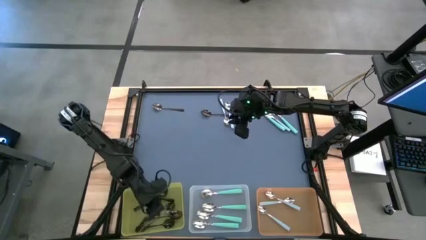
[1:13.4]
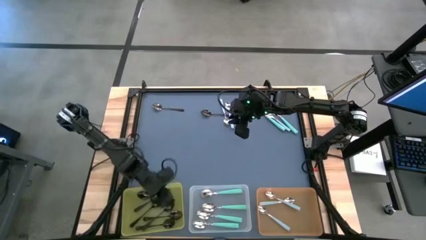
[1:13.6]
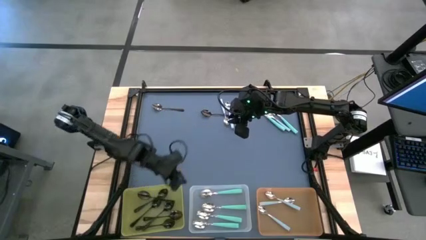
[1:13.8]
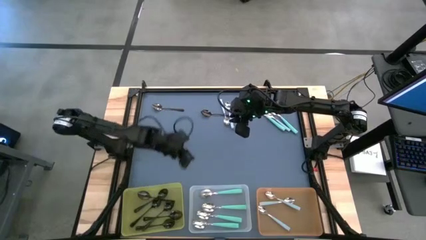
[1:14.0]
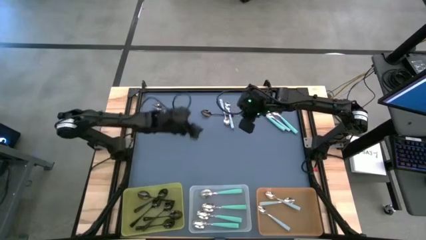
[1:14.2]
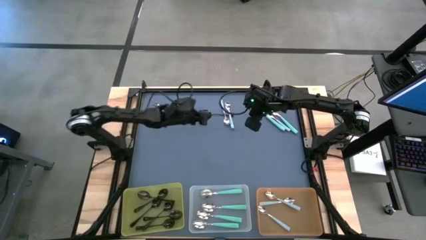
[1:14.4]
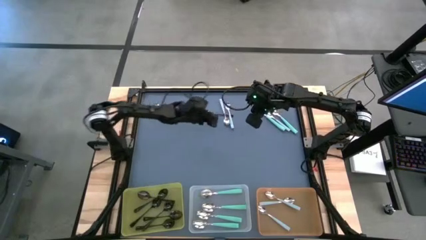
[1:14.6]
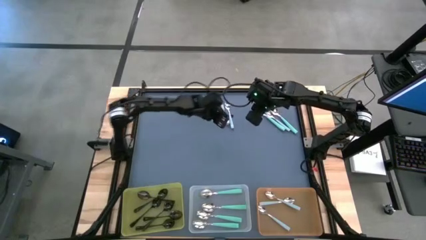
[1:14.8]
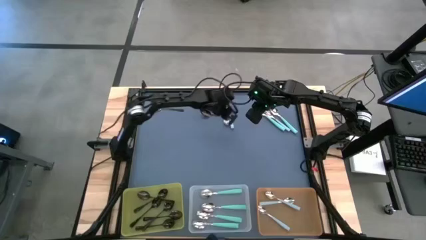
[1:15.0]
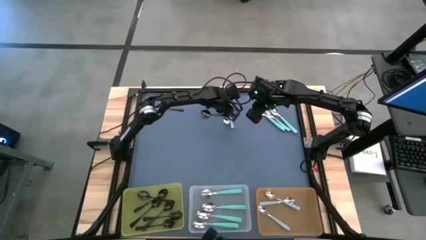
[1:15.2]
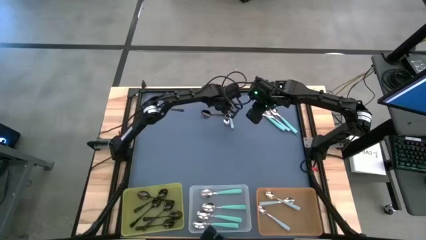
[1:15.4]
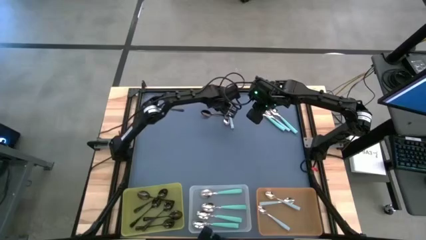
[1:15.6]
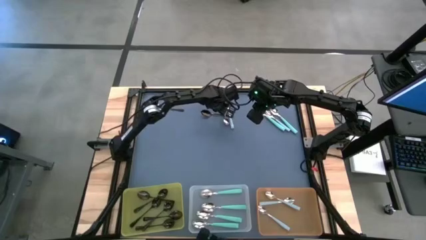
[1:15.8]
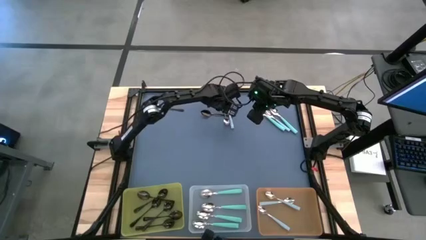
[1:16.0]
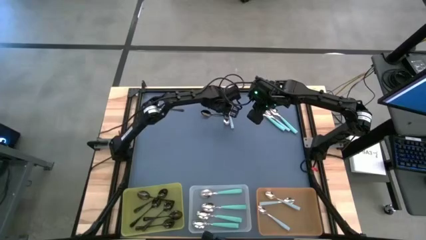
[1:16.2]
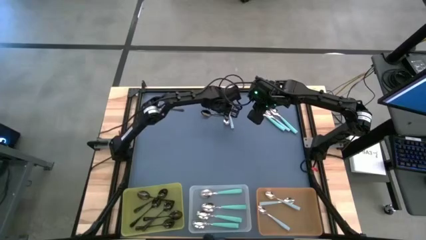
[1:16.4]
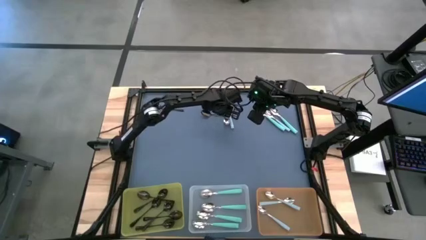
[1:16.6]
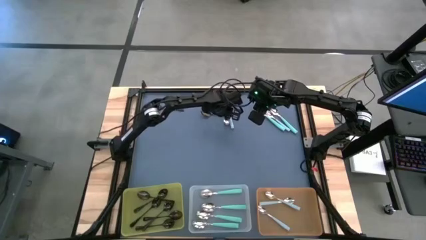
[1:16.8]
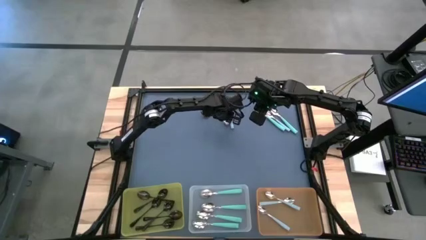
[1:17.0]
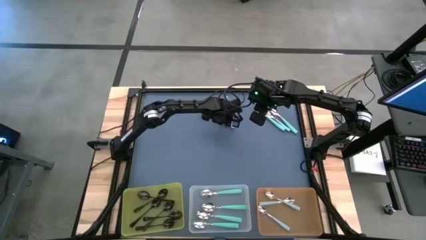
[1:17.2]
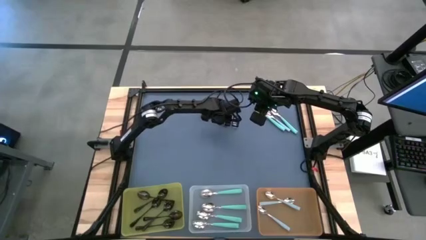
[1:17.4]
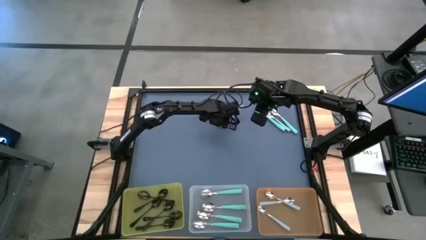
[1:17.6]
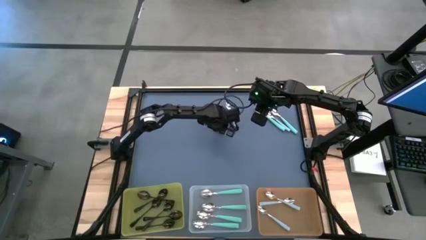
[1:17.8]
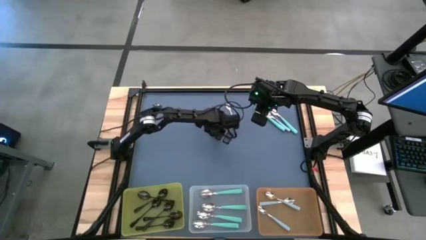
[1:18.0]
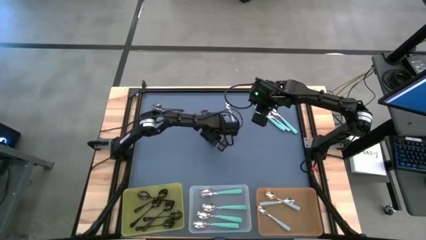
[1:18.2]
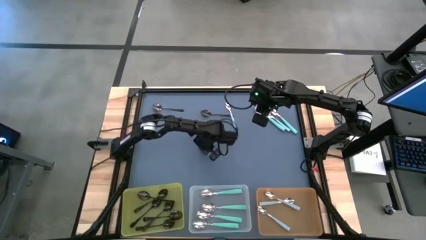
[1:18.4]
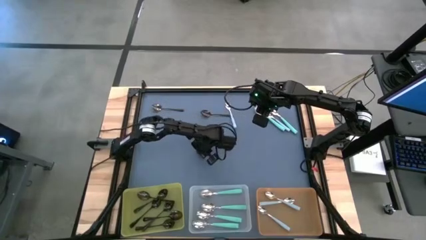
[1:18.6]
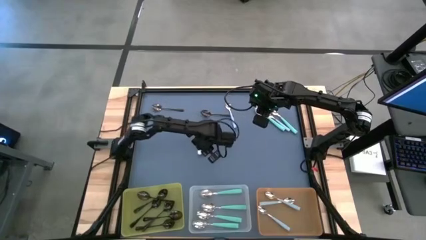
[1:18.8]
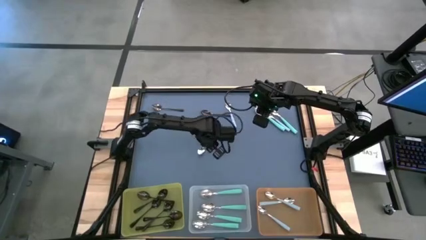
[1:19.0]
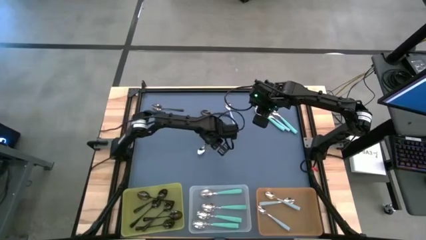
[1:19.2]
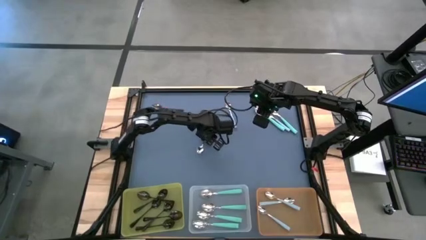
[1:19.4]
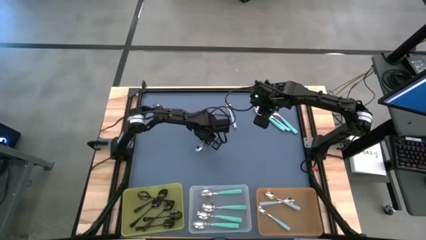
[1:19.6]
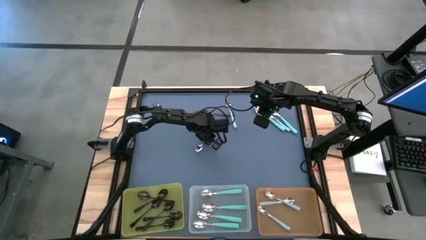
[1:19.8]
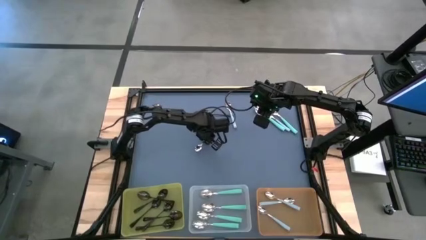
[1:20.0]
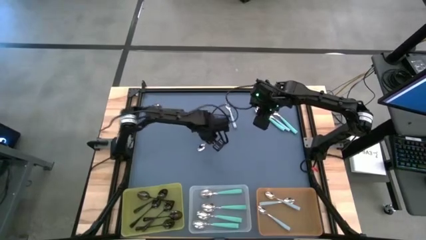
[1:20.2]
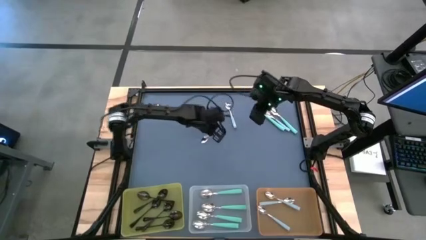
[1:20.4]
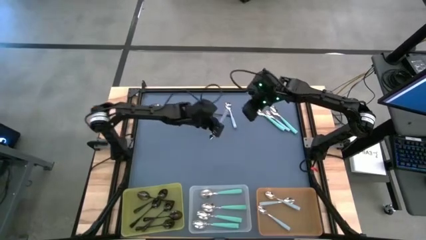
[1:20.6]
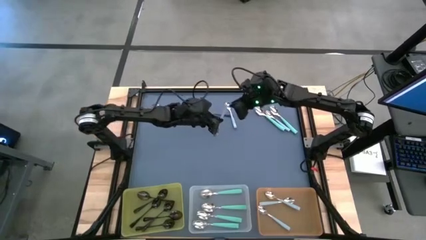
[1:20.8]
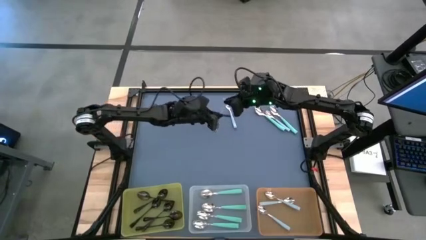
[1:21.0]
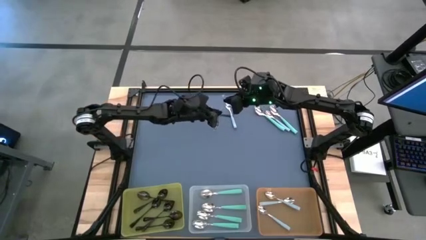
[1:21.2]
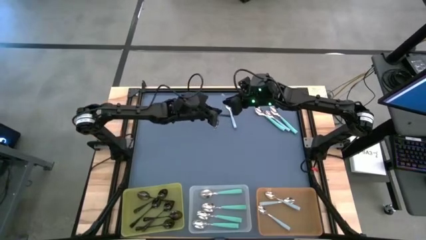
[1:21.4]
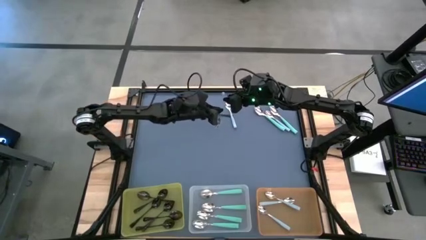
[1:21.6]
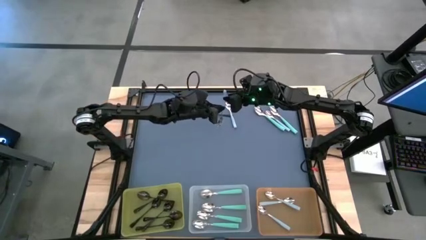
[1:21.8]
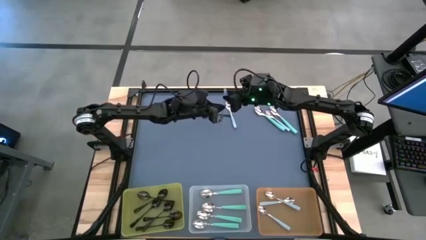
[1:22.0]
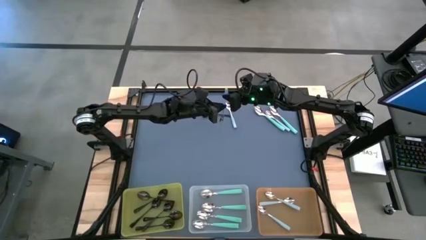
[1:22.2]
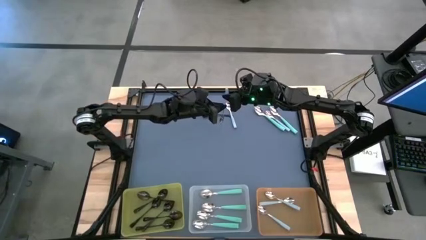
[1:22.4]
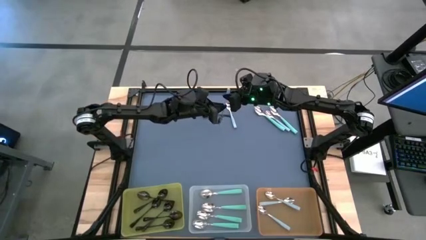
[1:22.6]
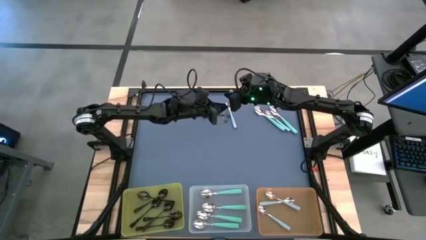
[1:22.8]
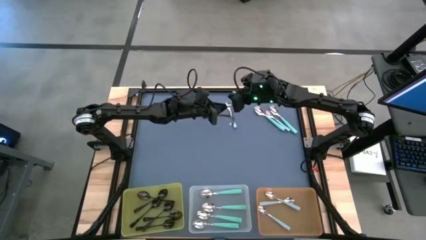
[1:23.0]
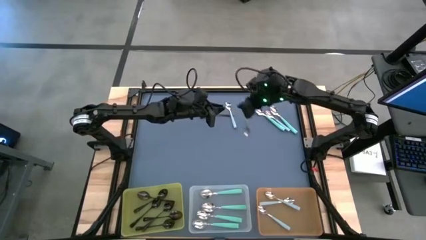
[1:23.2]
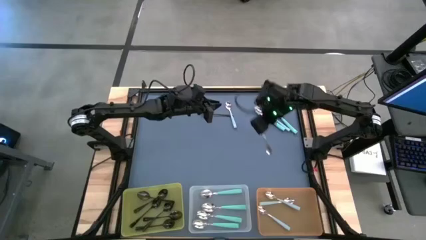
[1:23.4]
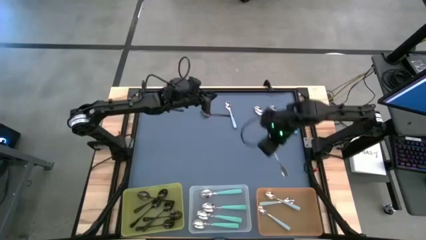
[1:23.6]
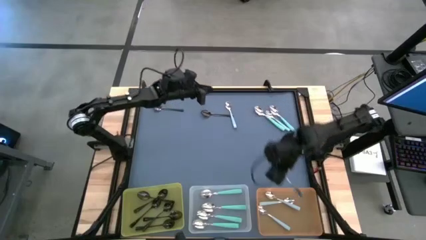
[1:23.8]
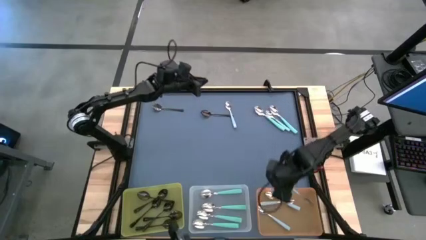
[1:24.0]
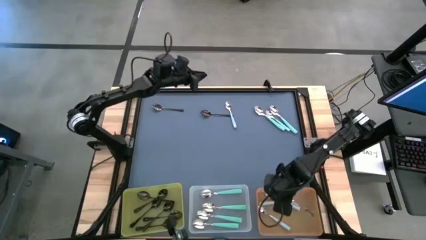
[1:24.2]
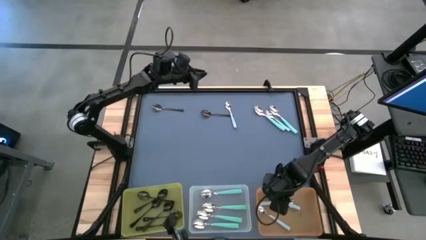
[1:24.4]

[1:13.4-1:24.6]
Task: Sort silverware by color (type)
Put the blue spoon into the orange bin

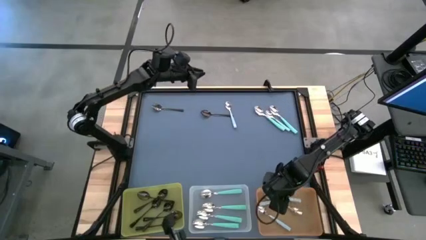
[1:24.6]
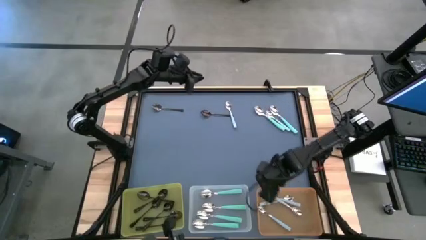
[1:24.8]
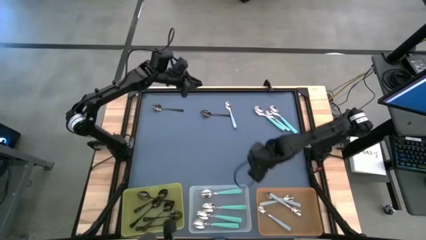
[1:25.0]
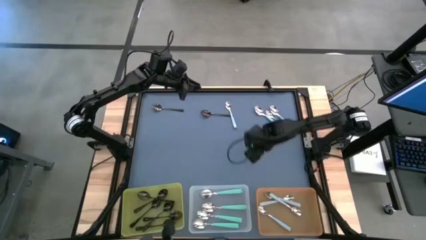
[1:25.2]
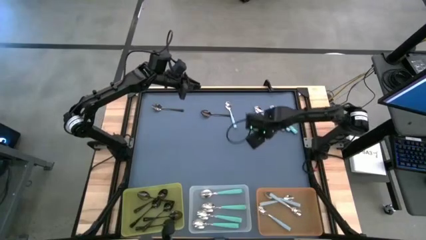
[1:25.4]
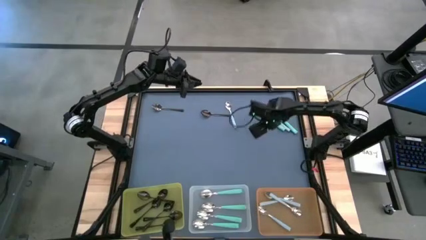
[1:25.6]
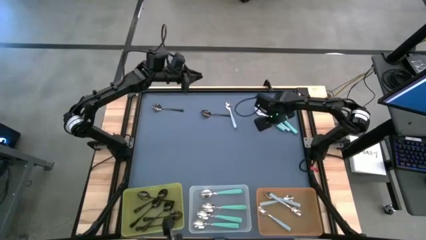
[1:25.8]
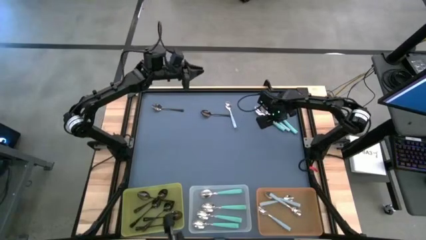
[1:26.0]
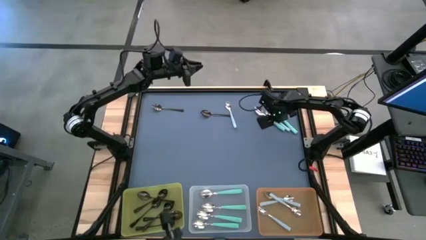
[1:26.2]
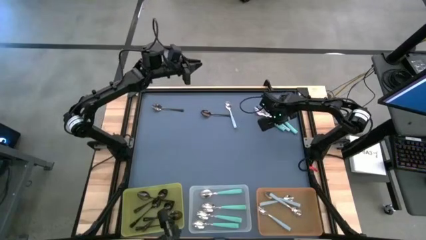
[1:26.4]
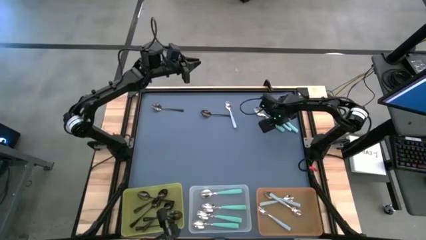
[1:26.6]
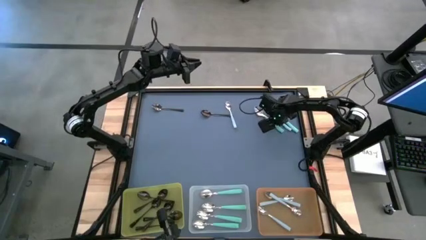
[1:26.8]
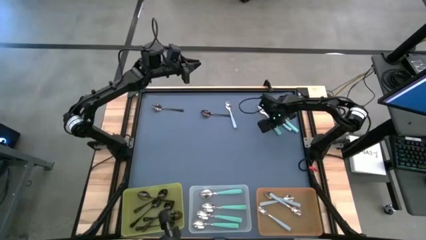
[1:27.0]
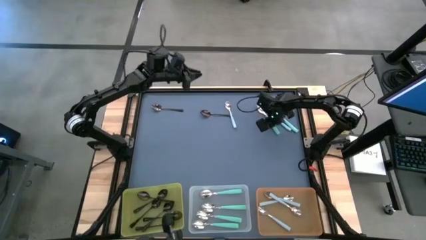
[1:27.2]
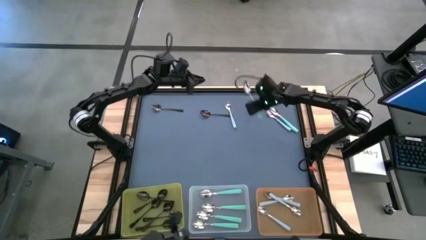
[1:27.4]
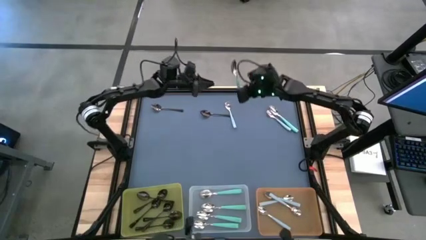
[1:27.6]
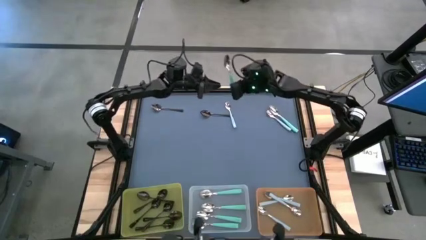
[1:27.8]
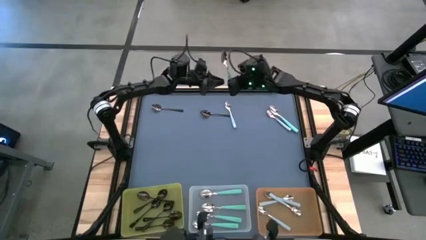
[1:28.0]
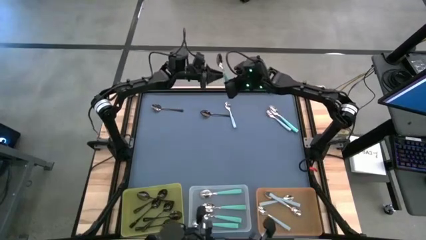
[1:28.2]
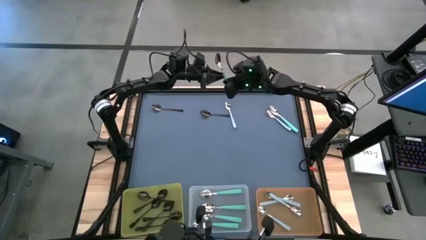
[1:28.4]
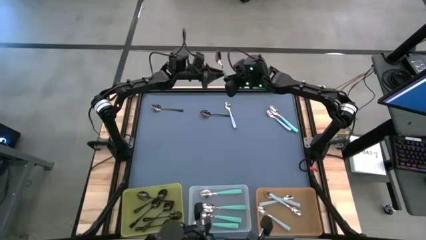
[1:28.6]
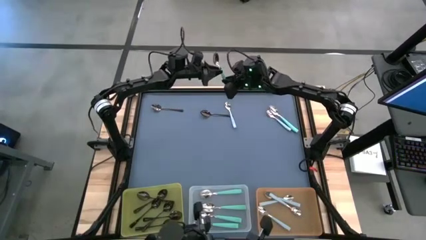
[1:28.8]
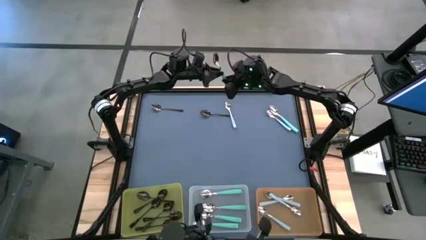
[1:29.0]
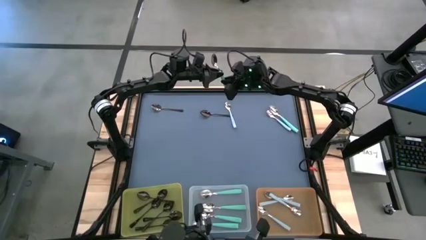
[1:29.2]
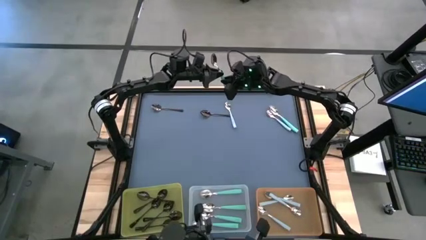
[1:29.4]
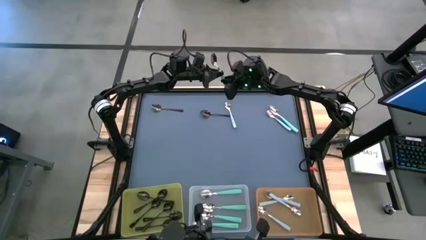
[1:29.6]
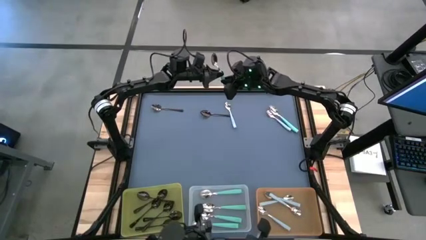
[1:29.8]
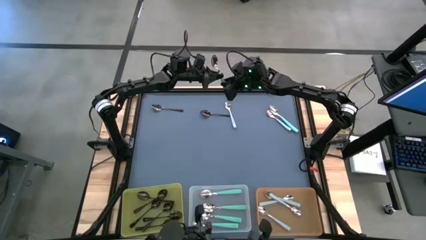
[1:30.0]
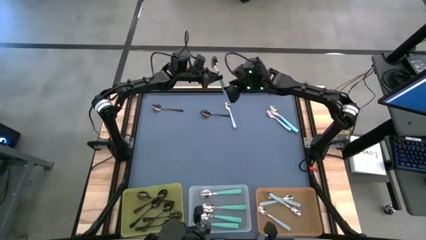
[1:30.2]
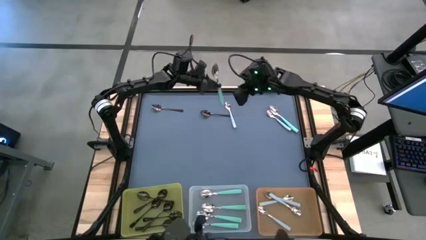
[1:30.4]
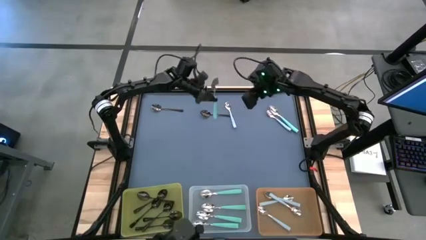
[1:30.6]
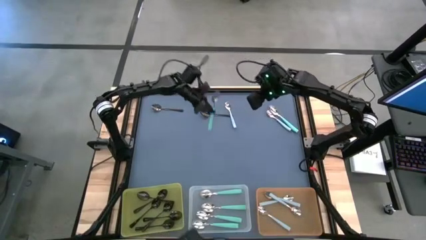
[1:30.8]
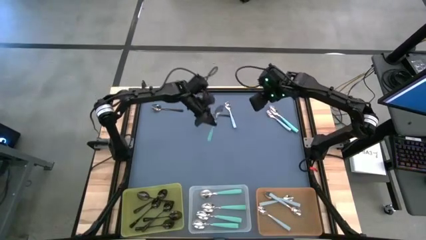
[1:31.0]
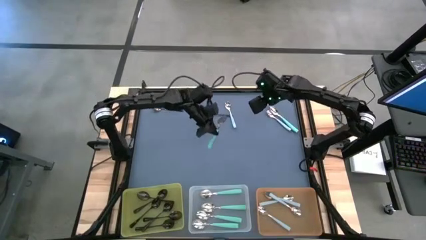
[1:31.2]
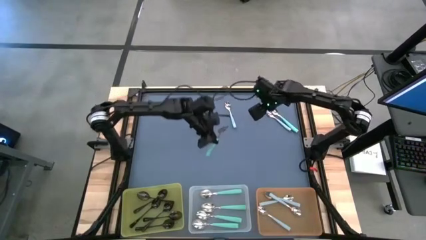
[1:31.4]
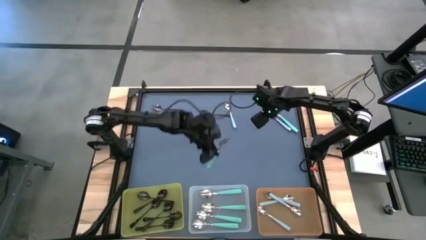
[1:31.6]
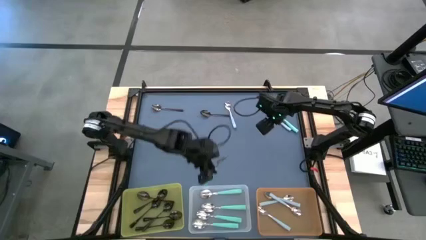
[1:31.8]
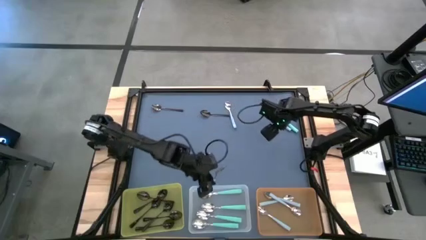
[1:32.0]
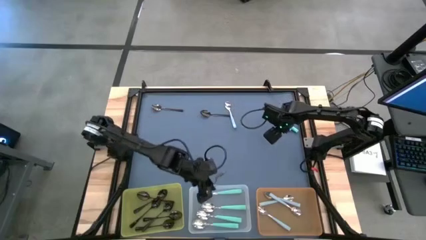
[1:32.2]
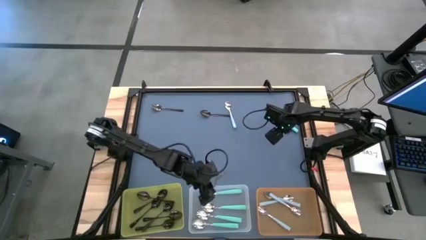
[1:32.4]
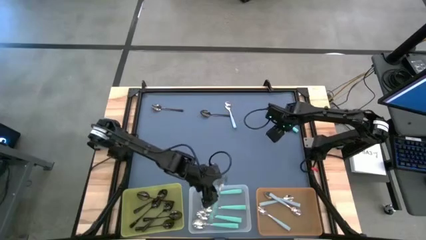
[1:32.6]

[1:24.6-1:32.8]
Put the green spoon into the transparent bin
